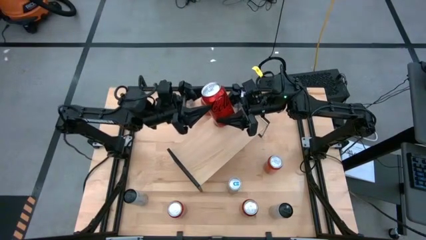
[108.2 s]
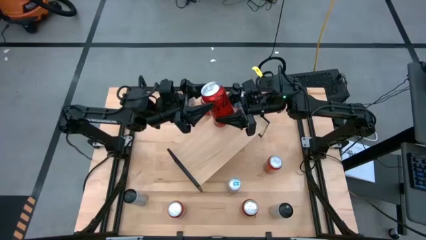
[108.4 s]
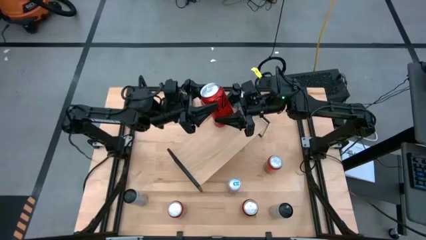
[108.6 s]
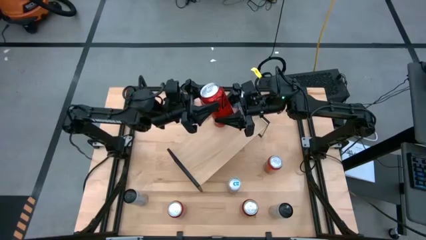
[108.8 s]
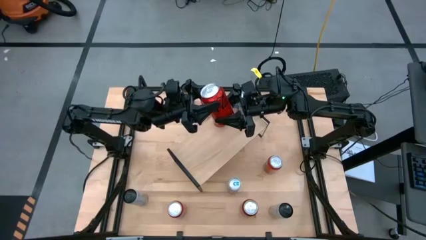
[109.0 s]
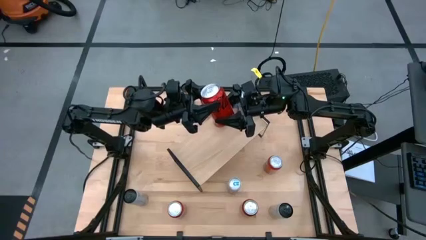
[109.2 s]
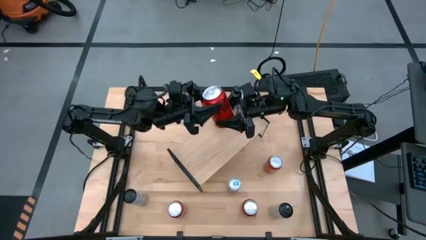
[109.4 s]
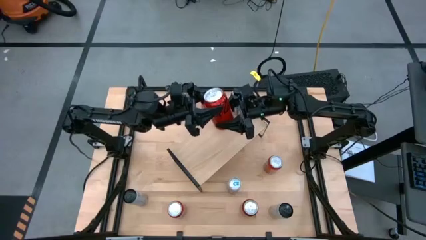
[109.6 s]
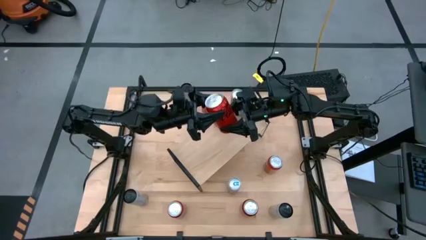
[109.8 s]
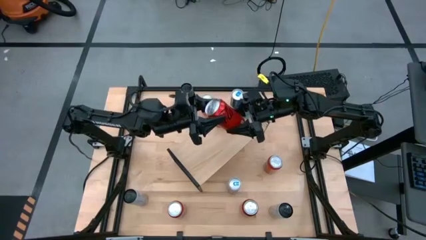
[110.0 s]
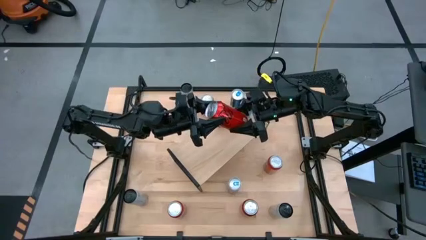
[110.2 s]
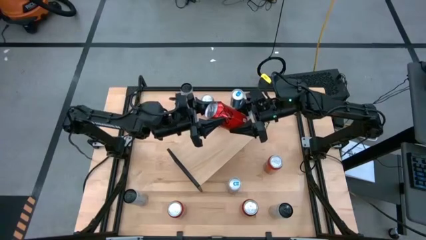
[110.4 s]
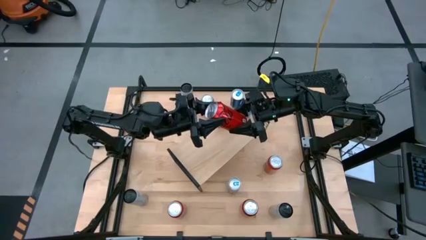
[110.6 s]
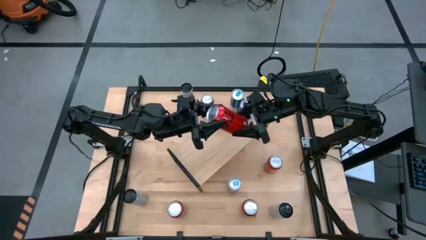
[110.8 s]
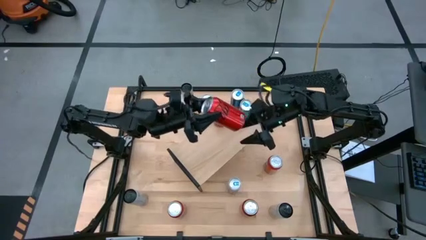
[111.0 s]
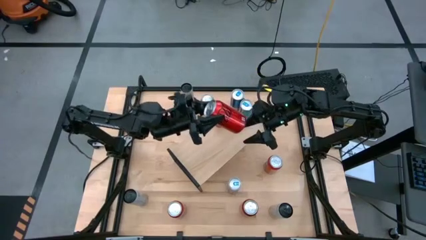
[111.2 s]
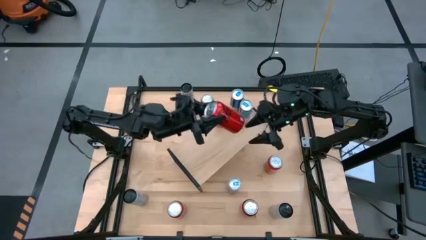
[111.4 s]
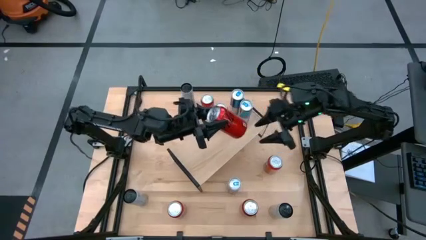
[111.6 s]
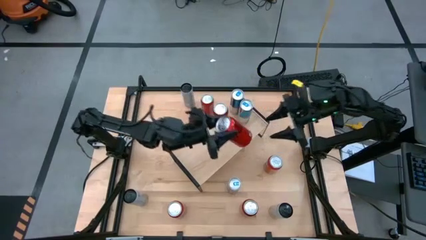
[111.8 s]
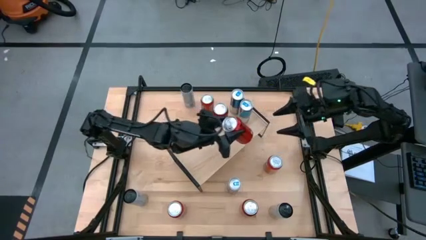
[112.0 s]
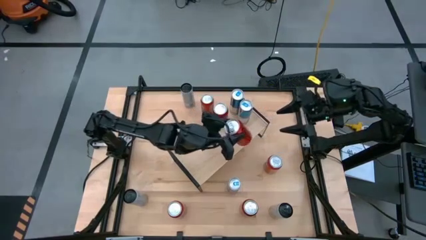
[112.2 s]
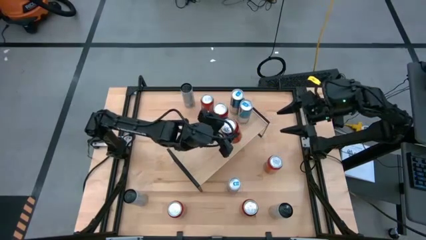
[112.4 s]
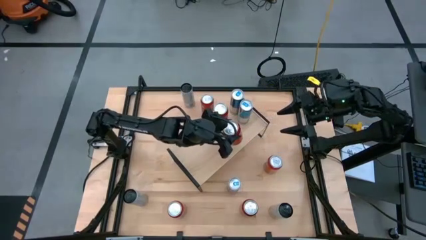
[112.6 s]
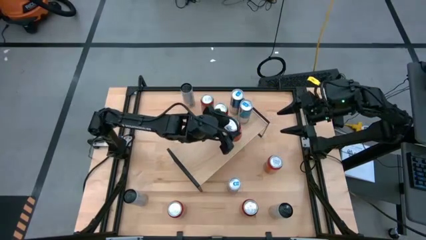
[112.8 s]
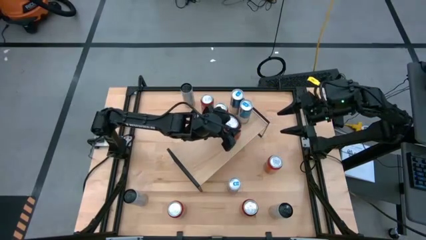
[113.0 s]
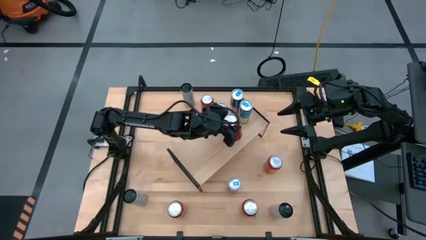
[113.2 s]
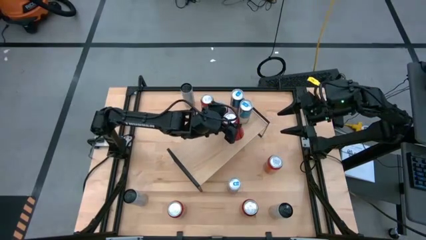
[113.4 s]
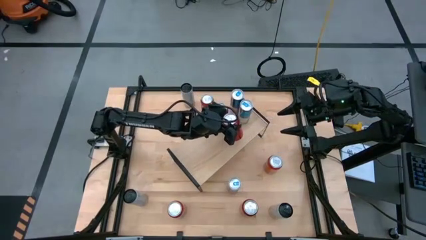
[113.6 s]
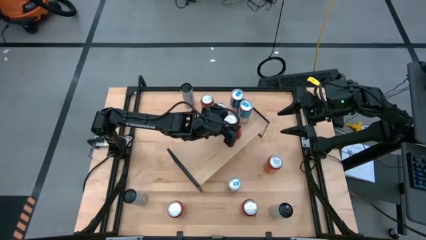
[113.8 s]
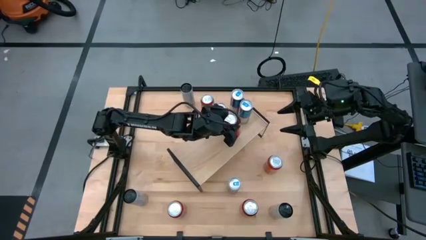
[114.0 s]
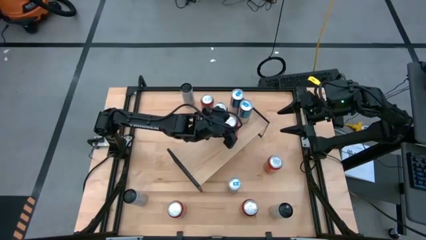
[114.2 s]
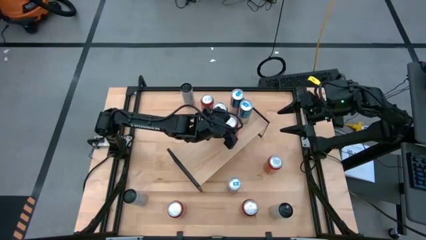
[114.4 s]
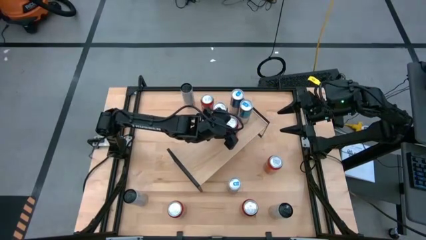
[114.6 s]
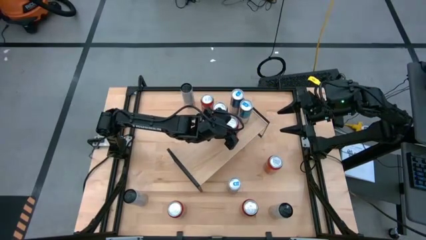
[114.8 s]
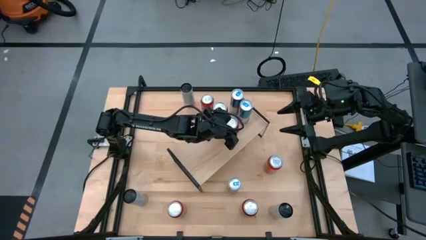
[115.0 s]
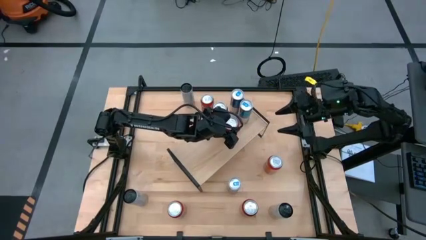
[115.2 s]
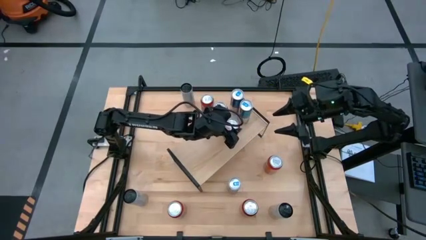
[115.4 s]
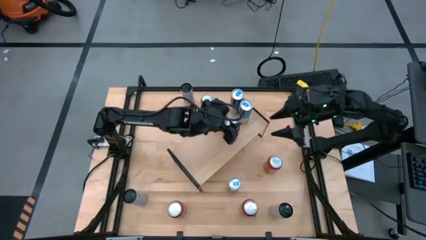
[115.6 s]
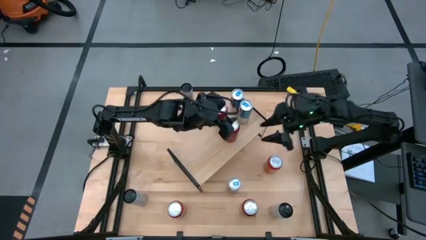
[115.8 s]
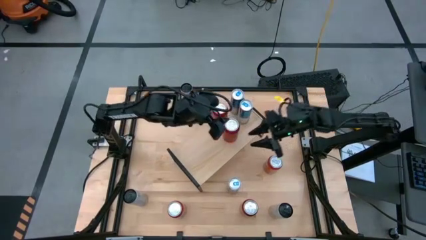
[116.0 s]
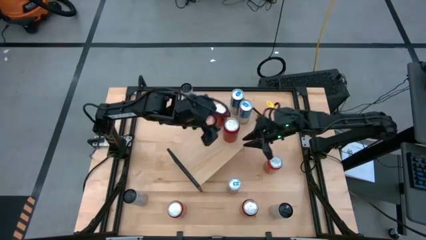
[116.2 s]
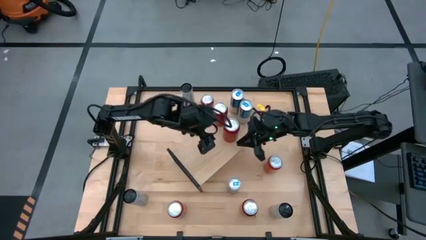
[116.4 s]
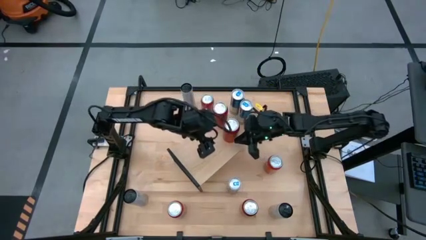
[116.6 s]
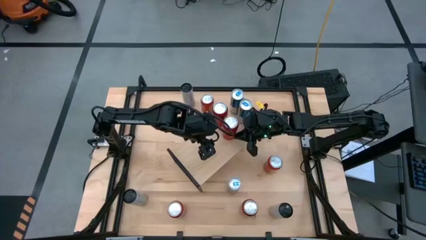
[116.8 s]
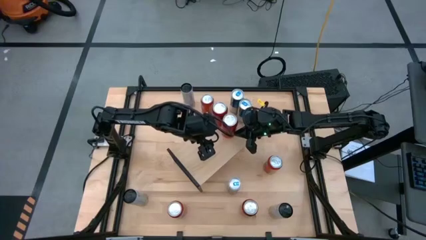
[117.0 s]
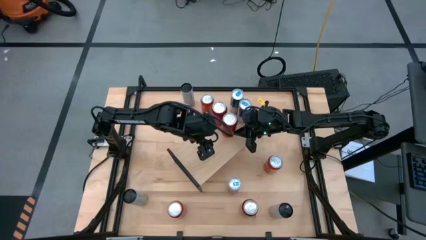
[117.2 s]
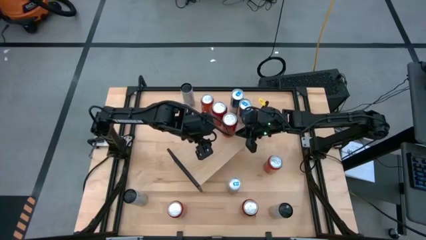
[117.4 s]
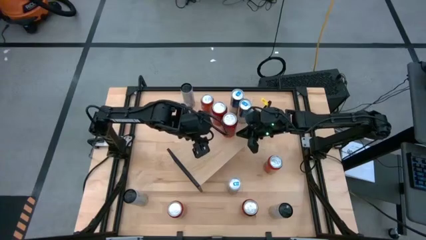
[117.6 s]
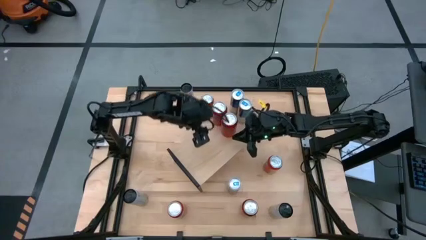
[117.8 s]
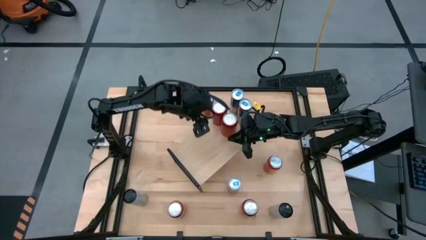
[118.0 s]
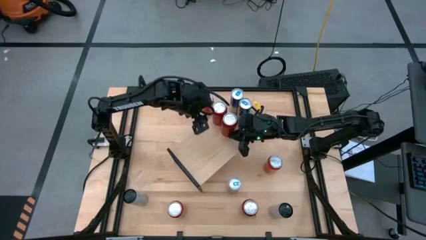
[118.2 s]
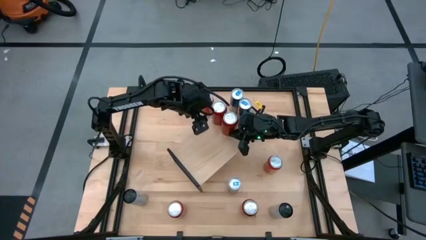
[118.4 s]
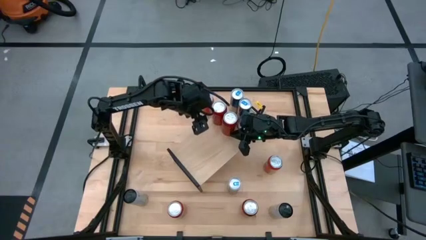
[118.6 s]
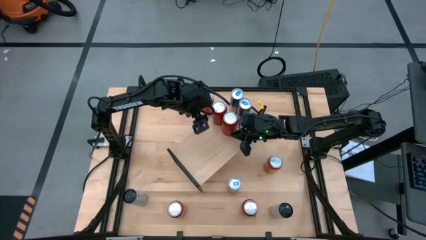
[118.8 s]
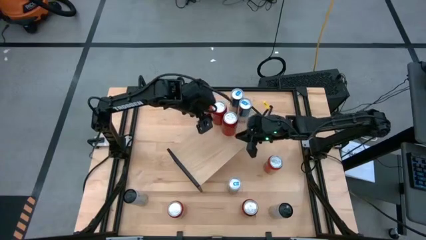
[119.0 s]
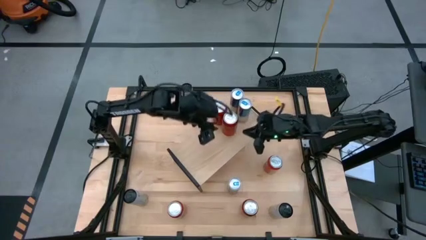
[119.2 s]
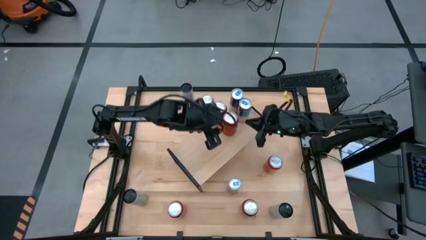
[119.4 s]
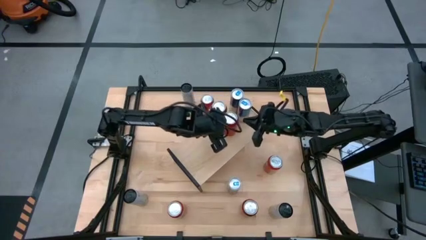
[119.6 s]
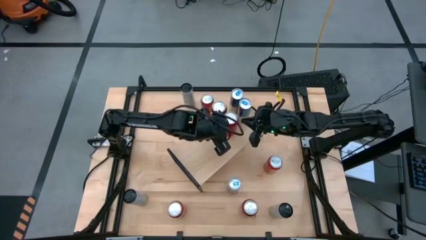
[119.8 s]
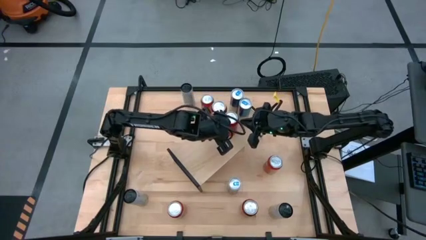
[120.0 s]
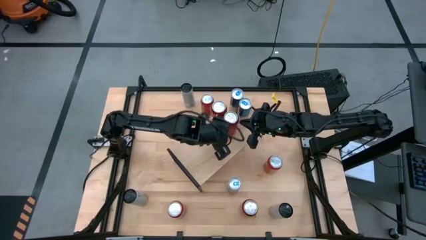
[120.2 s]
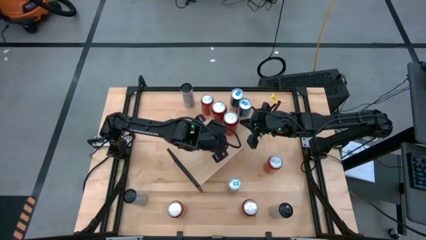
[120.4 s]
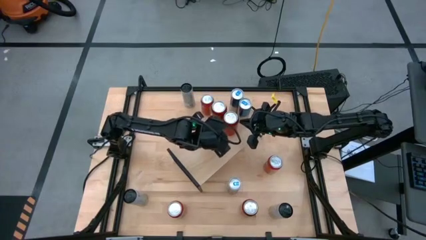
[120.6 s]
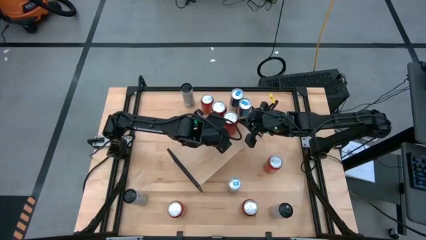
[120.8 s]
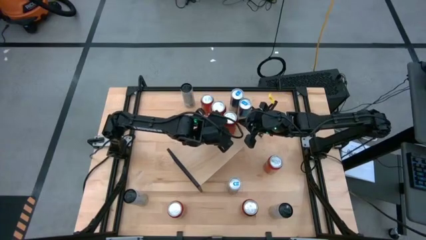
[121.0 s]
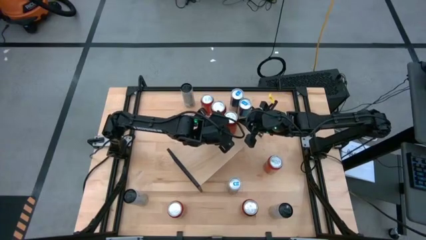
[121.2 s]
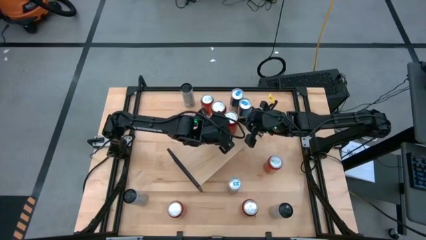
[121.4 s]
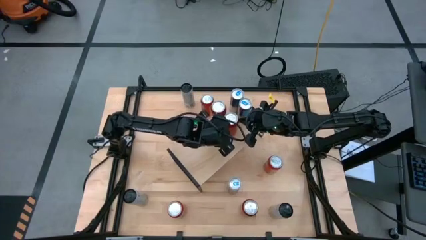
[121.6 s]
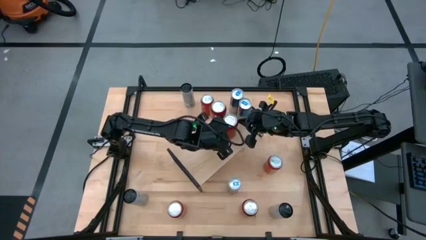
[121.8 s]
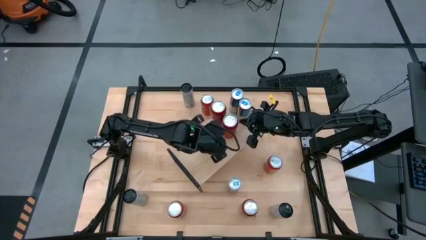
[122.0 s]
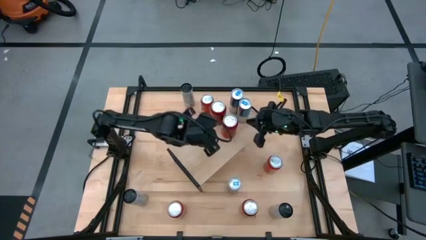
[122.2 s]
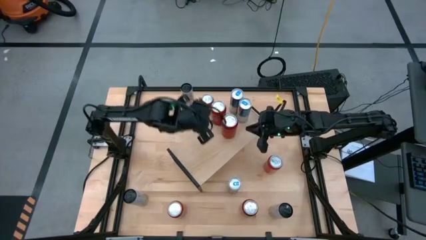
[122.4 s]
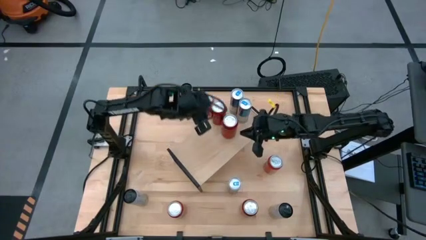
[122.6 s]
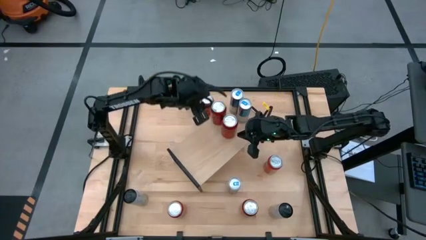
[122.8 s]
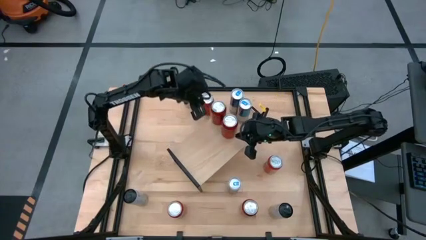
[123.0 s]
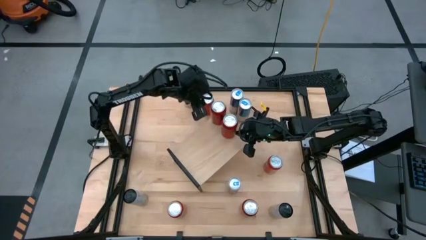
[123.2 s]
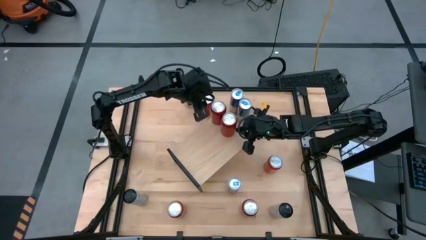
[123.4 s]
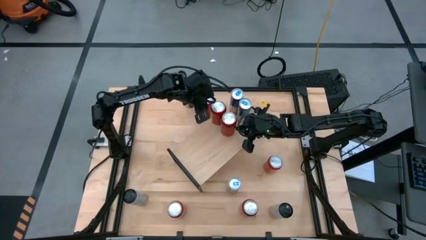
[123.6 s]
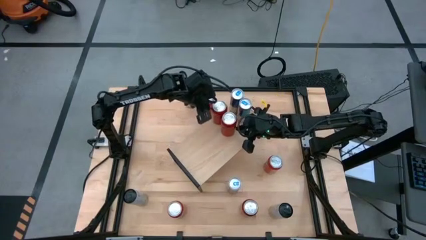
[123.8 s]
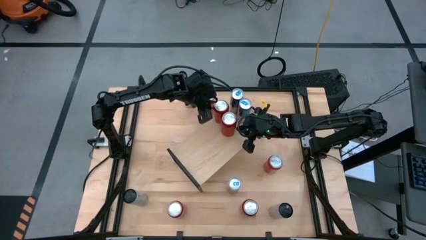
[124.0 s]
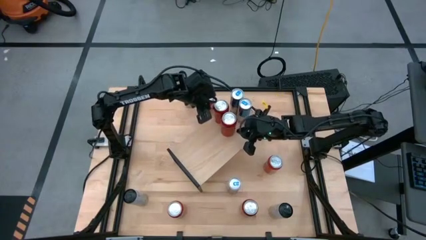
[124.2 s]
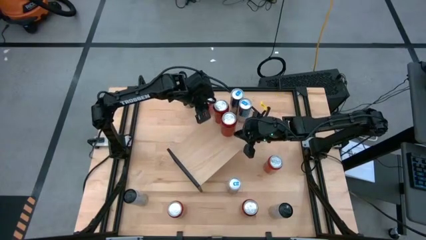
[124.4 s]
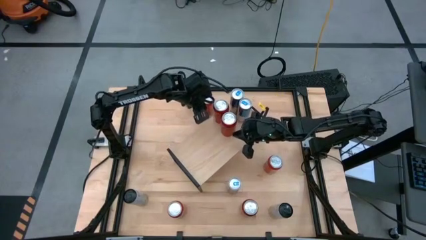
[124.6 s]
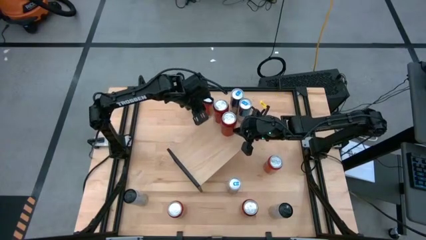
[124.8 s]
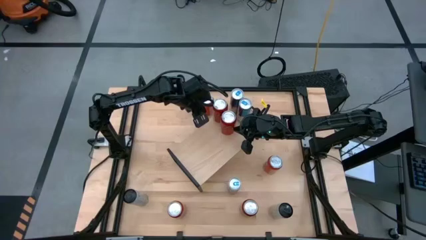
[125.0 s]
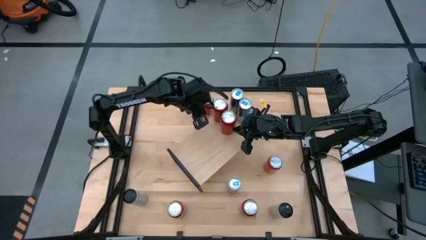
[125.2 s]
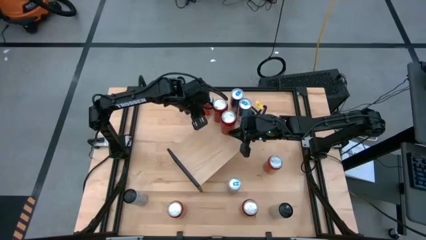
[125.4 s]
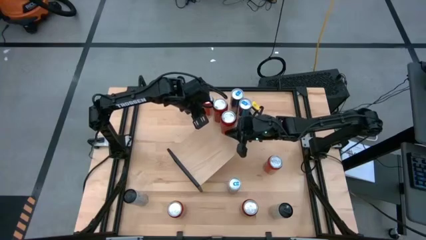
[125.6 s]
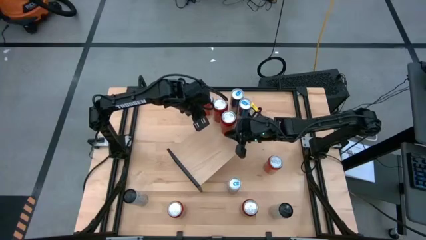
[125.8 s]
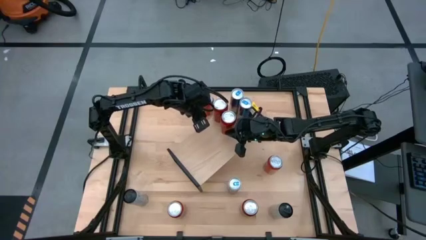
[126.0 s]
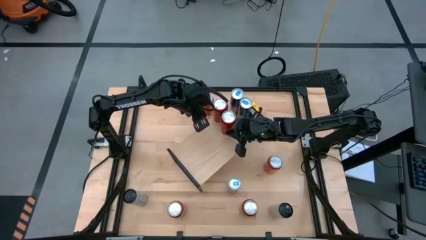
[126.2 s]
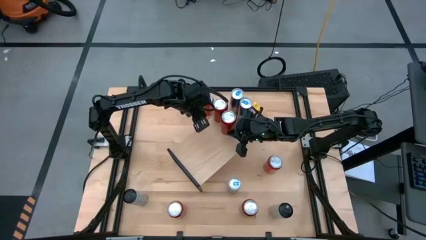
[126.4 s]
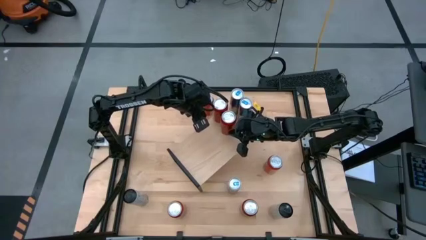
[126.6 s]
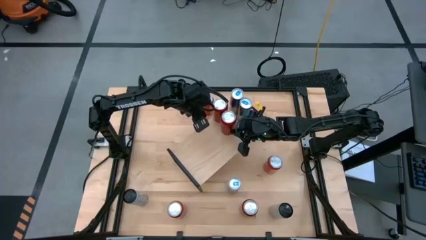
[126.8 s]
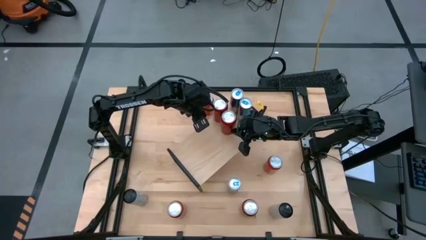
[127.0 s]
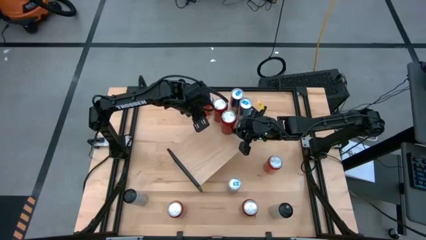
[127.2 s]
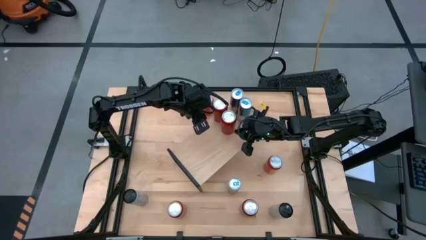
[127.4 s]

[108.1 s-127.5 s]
Task: Place canned beverage on shelf
Put the top red soda can on the shelf
